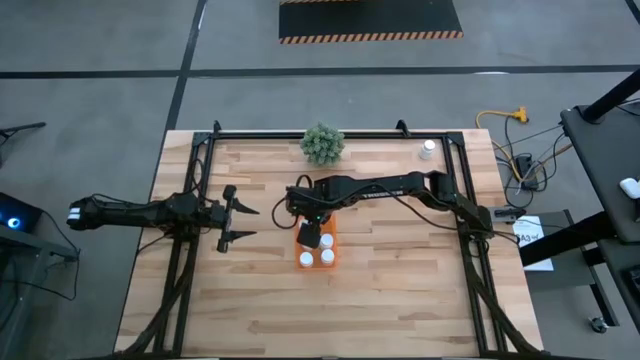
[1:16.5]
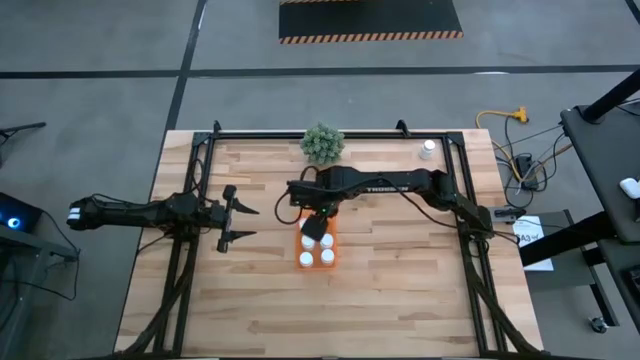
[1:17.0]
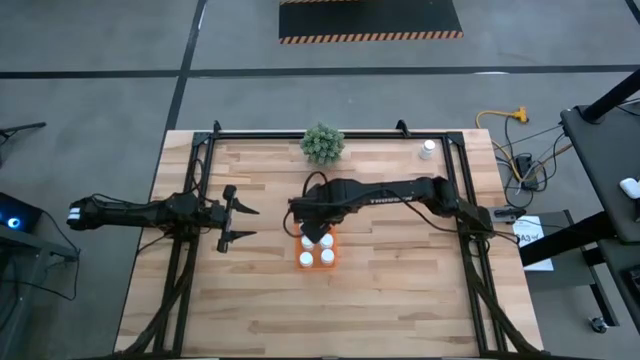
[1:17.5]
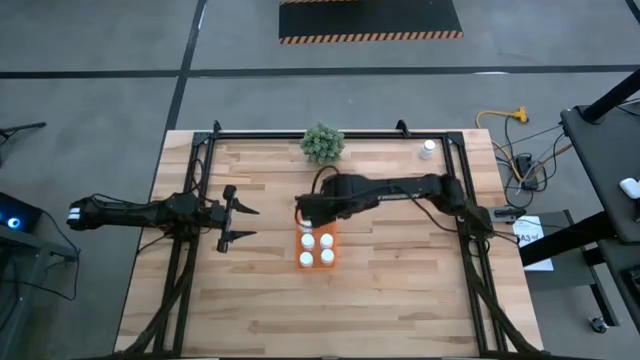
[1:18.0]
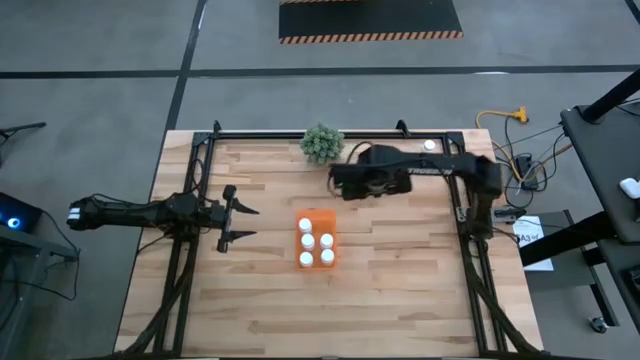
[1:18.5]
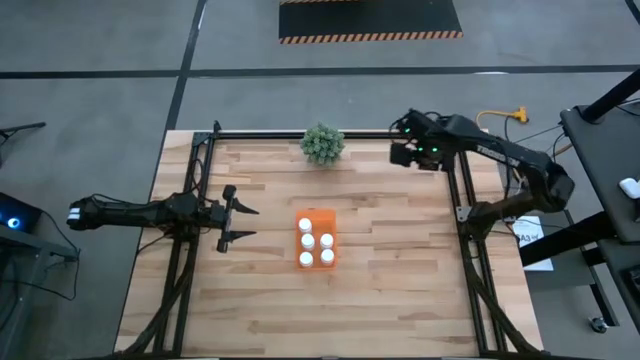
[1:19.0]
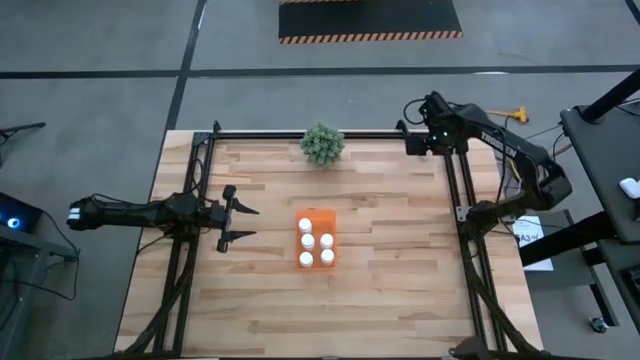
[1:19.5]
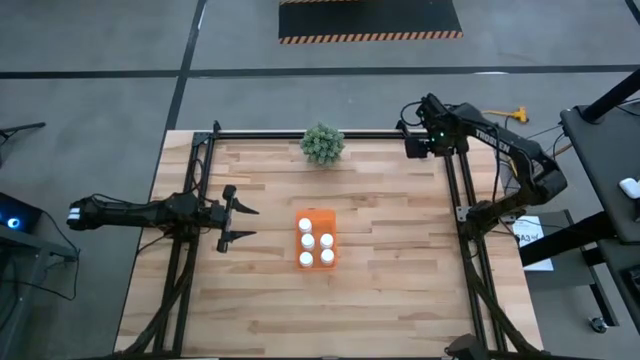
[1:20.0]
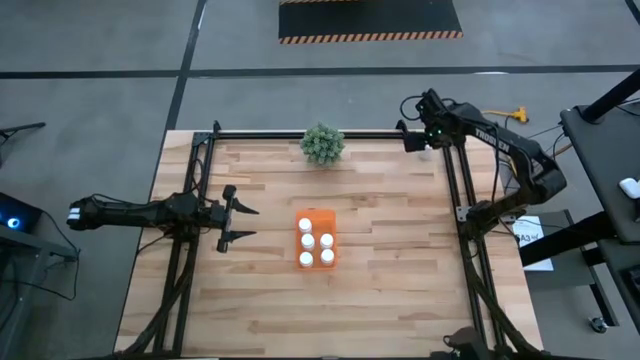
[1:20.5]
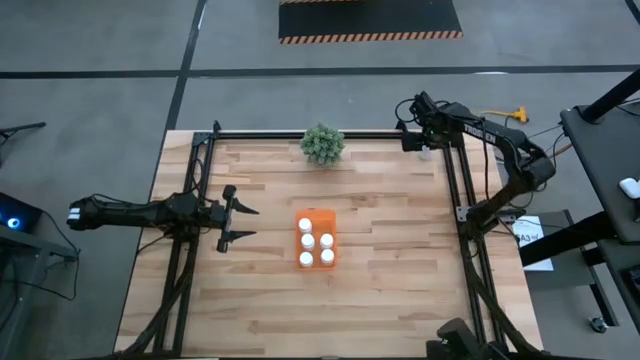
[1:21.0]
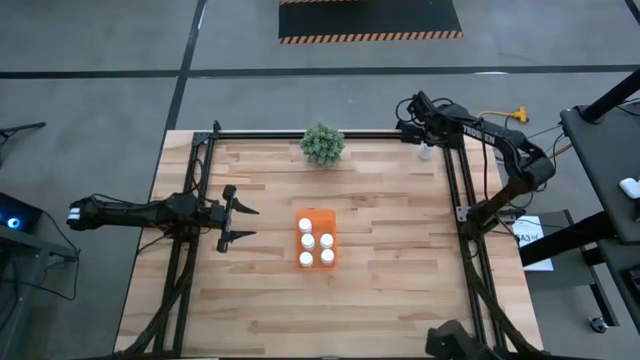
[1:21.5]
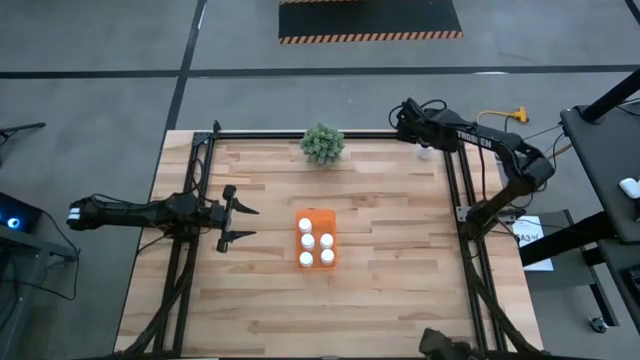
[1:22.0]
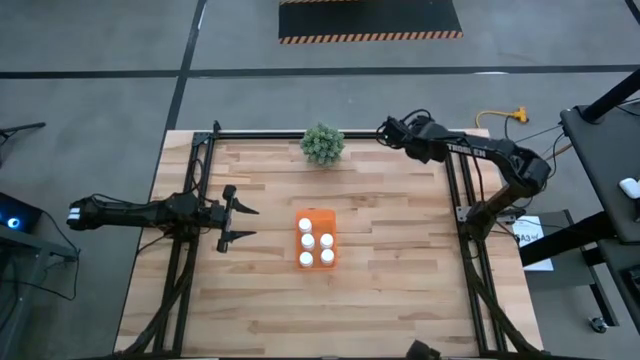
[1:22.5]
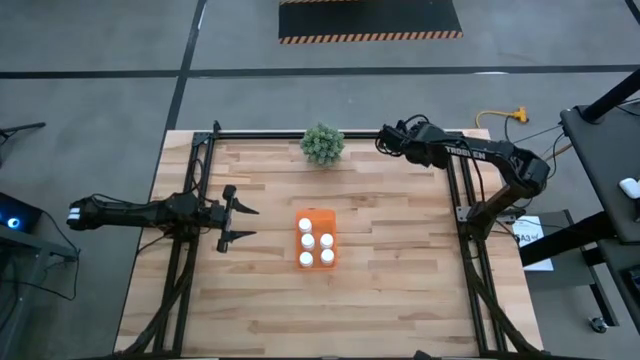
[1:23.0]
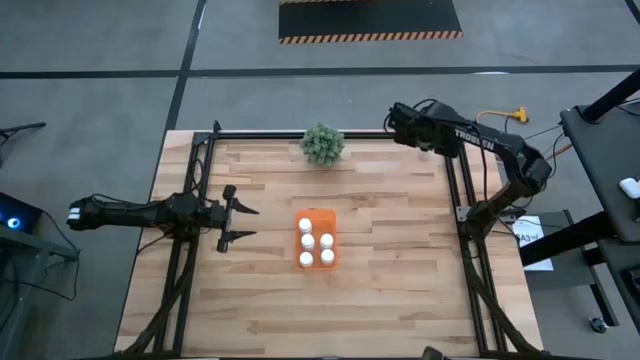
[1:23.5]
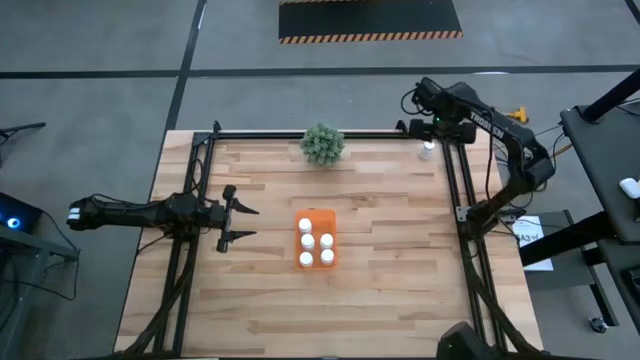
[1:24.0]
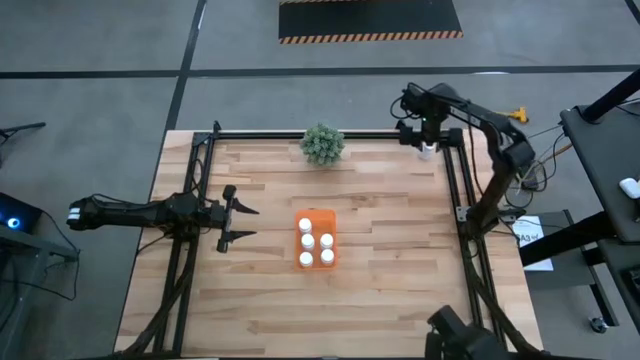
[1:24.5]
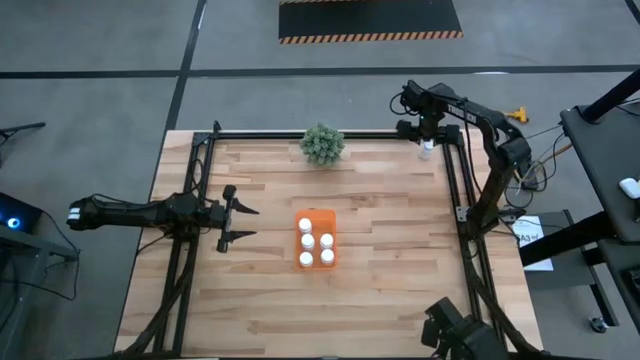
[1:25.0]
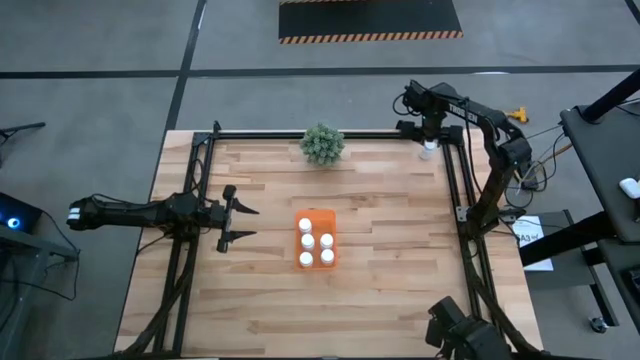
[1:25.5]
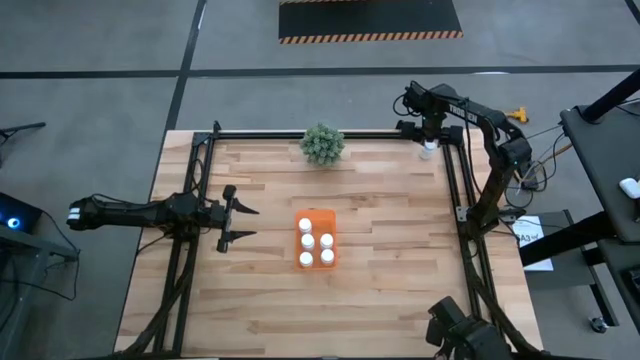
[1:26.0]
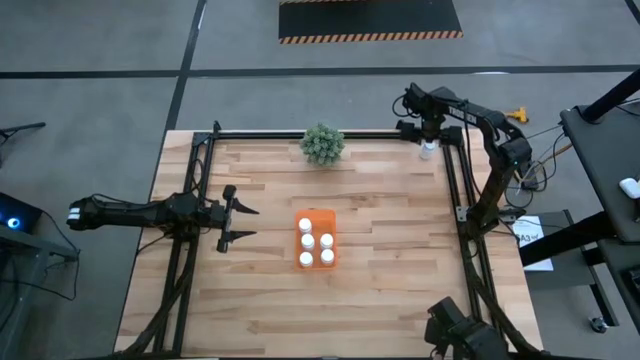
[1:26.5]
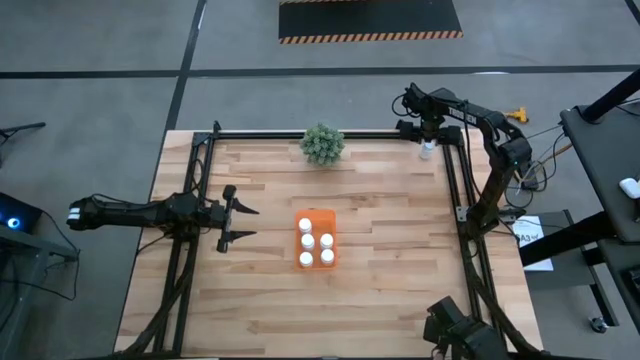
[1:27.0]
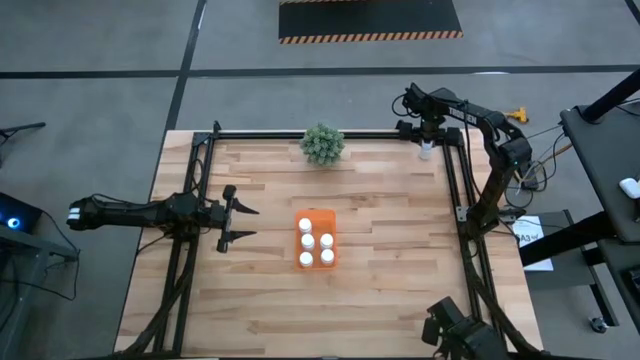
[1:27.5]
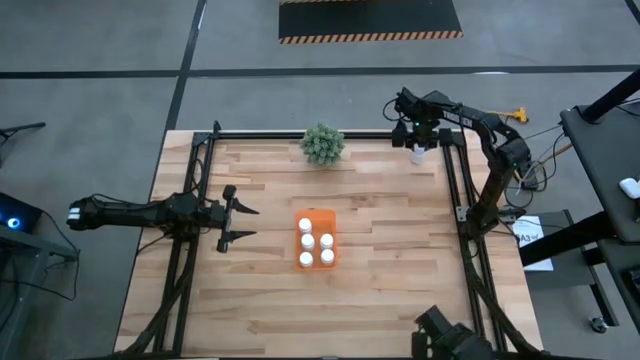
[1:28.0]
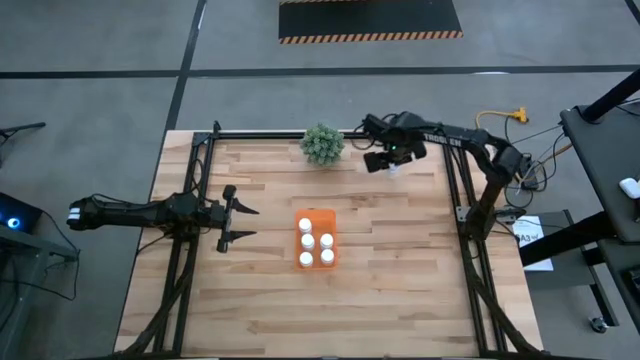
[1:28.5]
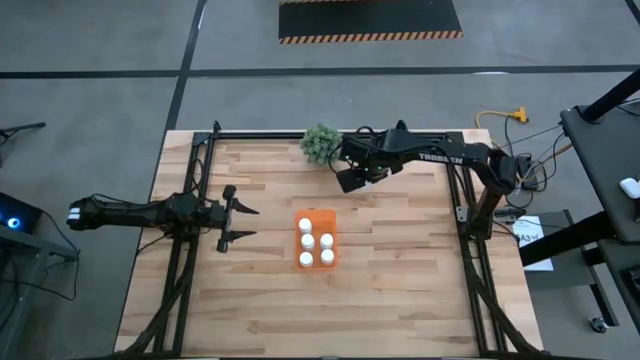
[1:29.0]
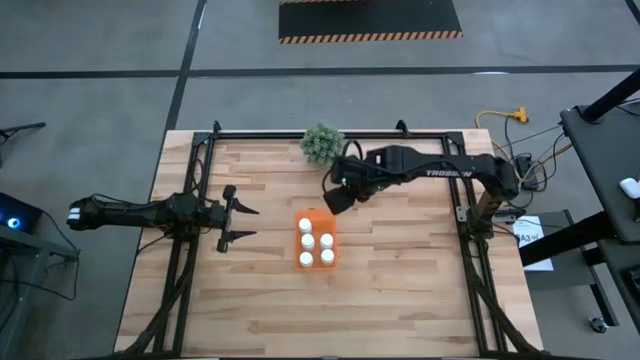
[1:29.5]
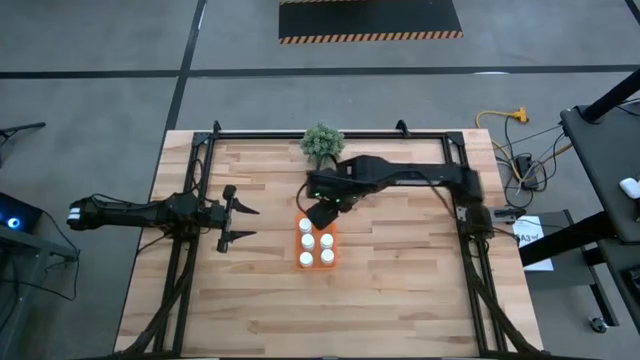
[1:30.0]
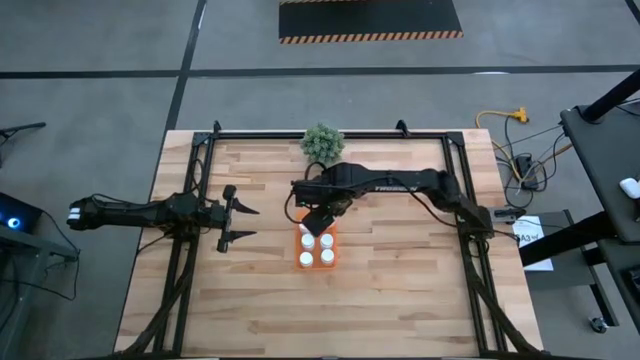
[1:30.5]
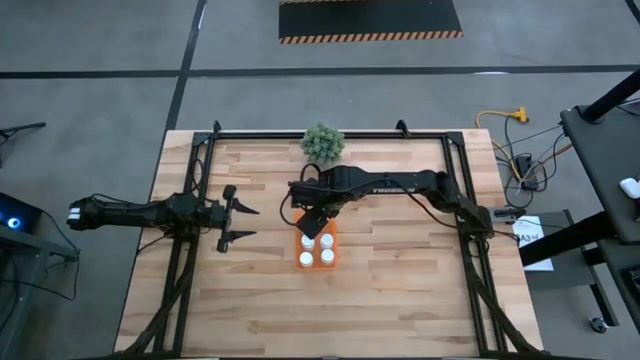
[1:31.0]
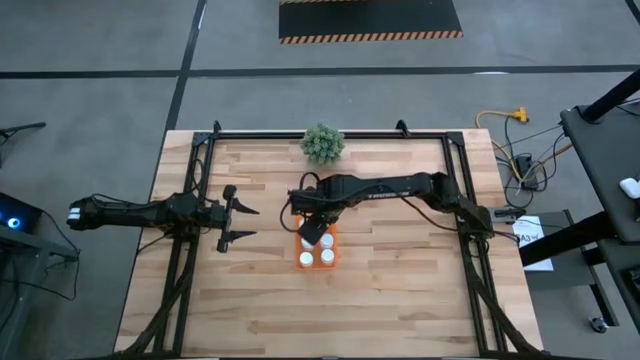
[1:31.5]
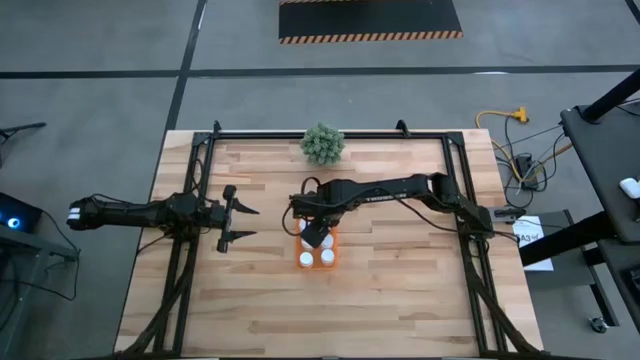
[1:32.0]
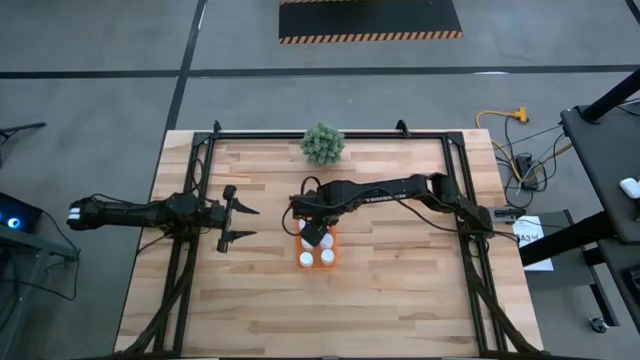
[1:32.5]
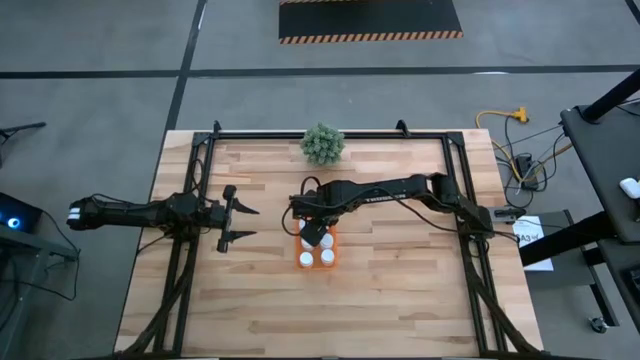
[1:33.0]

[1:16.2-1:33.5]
Task: Pick and place pill bottles into a basket
Put the white pill bottle into the orange bin

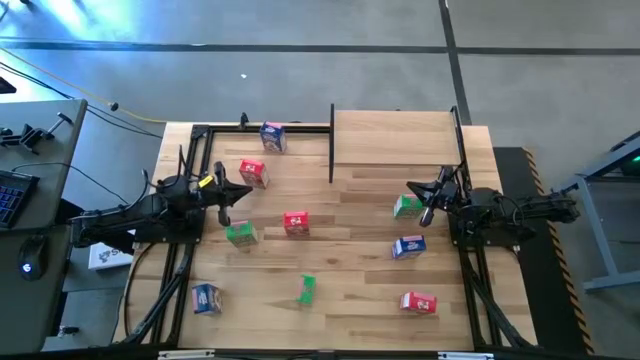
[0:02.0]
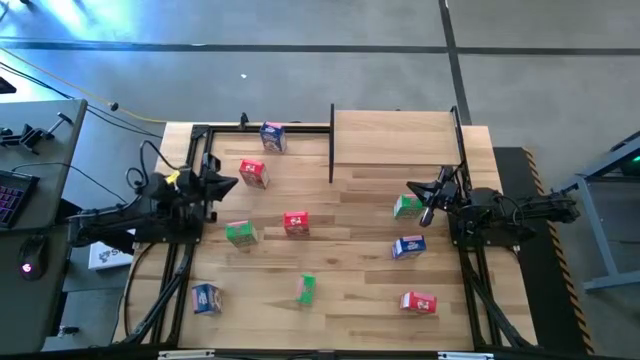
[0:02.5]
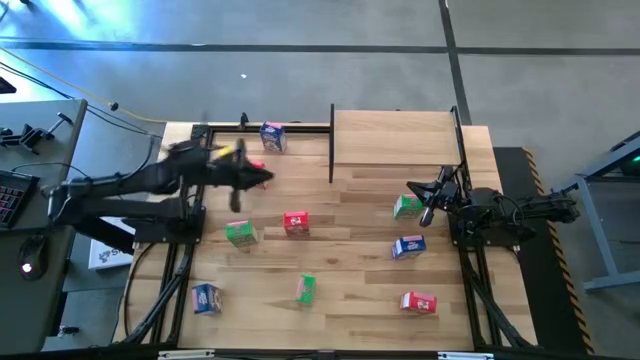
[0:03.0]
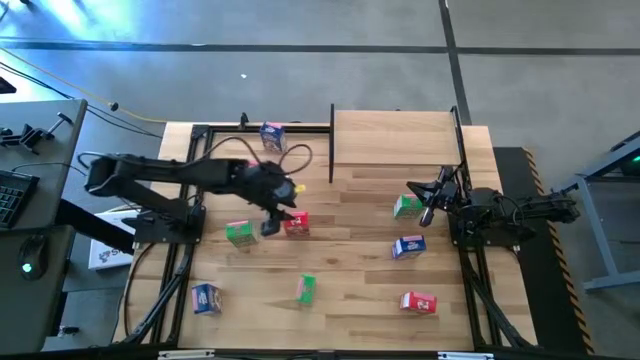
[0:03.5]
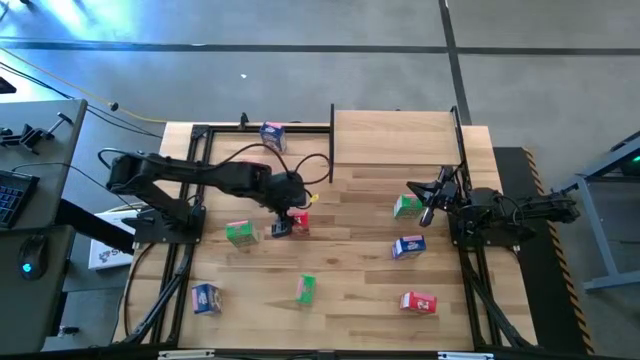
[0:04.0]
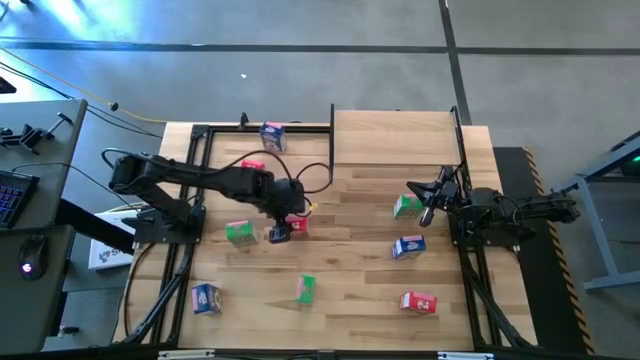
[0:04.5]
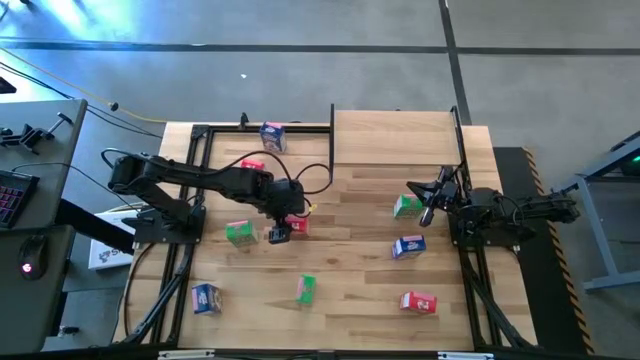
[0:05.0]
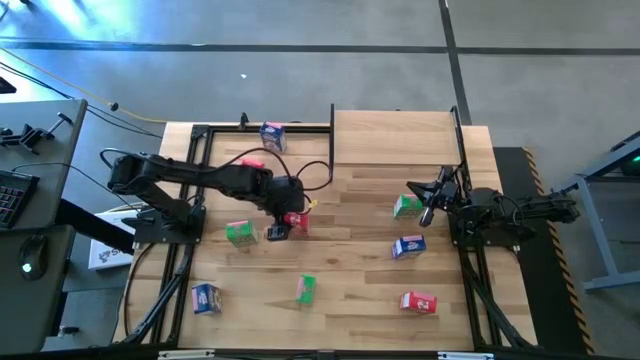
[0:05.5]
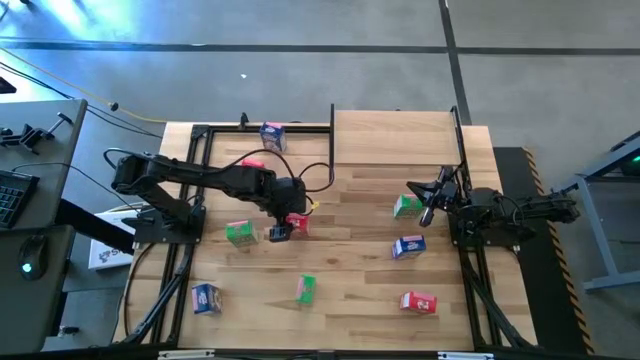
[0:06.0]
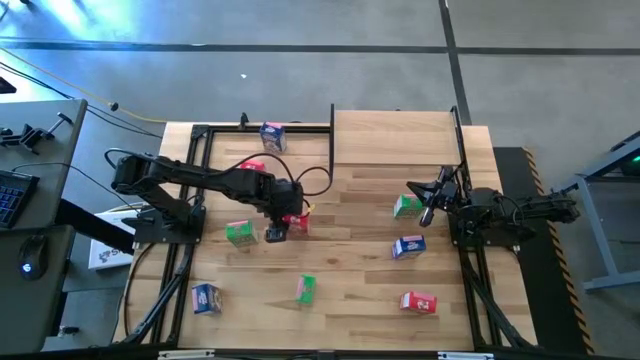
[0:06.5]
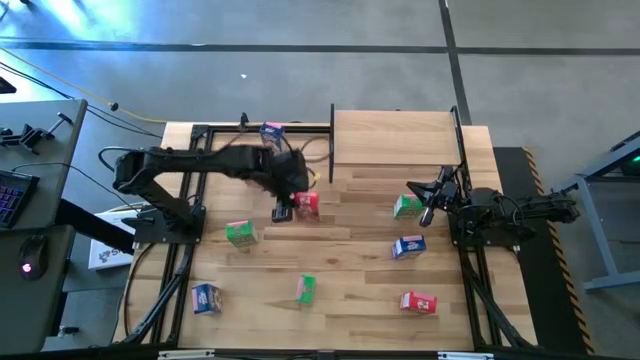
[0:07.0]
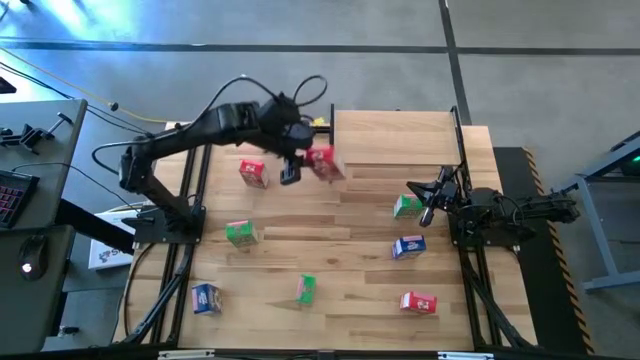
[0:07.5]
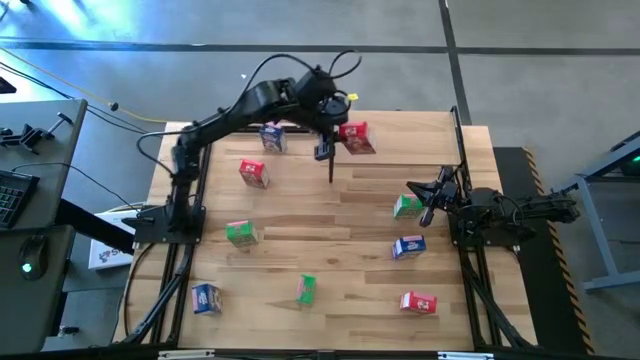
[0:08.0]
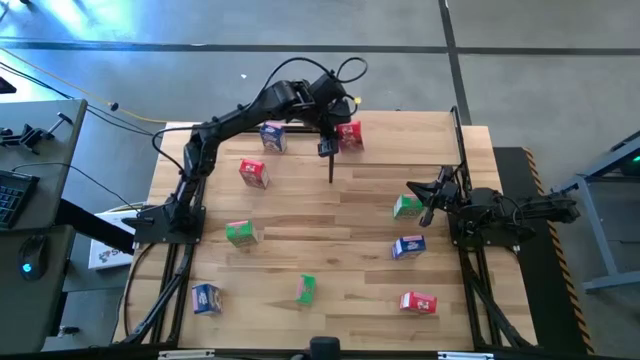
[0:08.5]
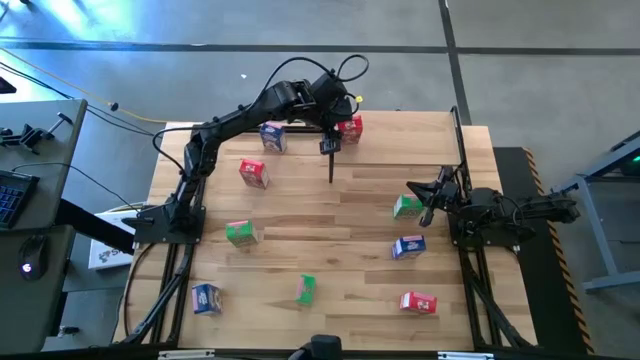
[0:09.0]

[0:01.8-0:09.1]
Task: Stack cereal on shelf
Put the middle red cereal box on the shelf
